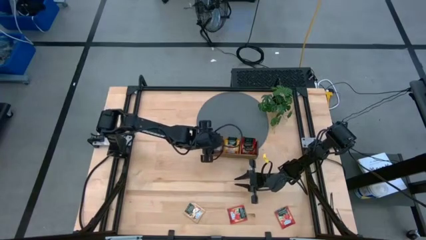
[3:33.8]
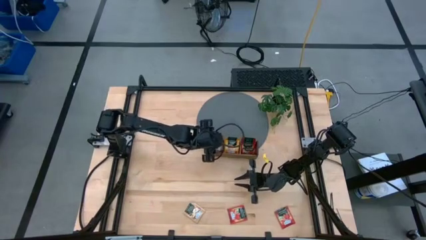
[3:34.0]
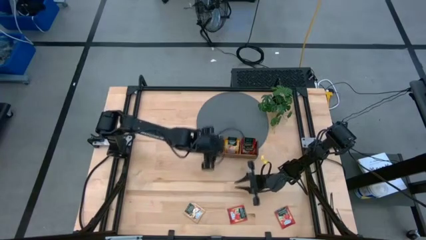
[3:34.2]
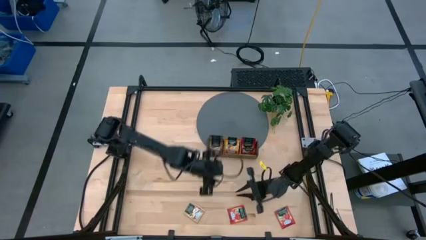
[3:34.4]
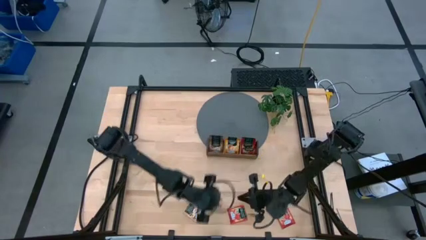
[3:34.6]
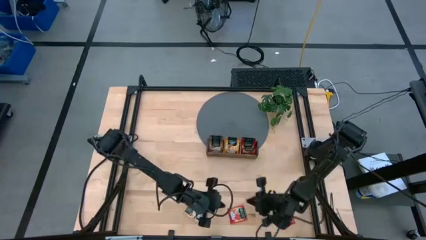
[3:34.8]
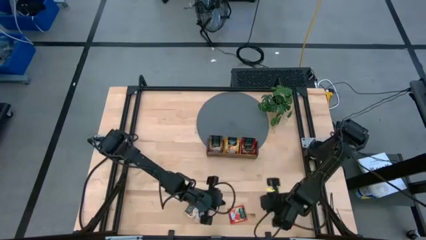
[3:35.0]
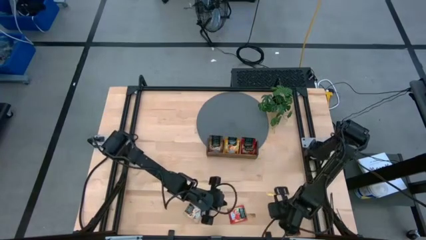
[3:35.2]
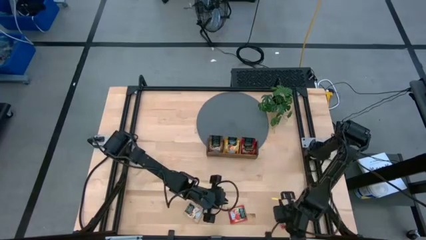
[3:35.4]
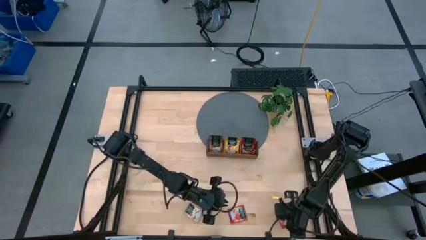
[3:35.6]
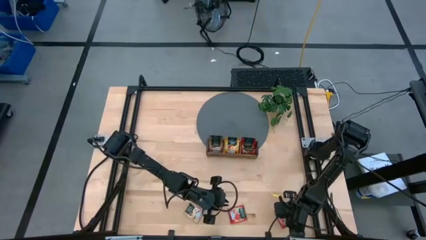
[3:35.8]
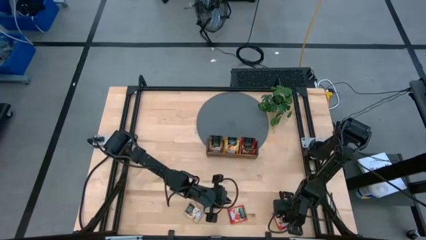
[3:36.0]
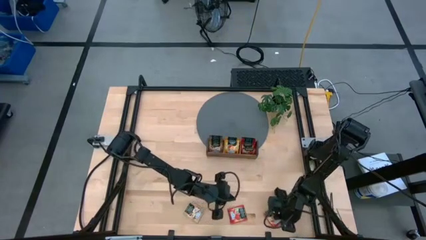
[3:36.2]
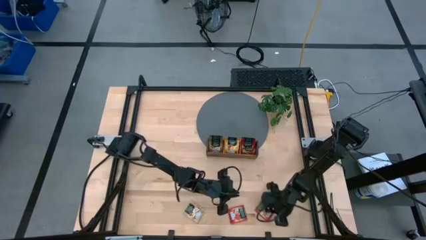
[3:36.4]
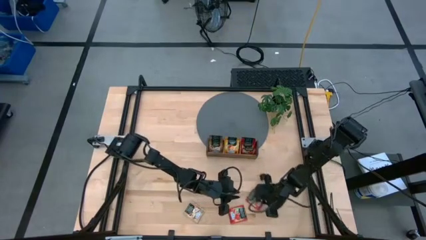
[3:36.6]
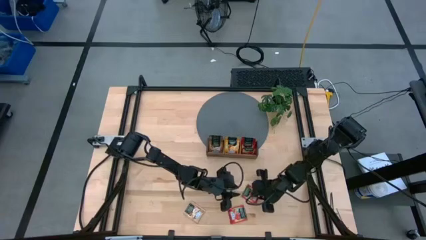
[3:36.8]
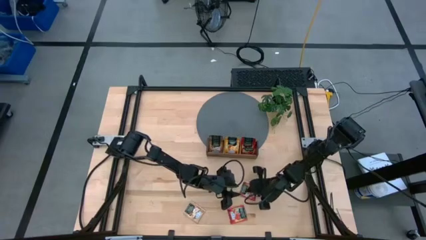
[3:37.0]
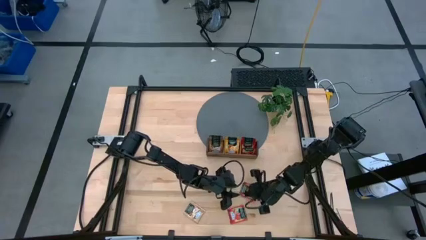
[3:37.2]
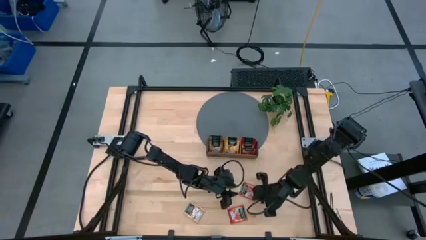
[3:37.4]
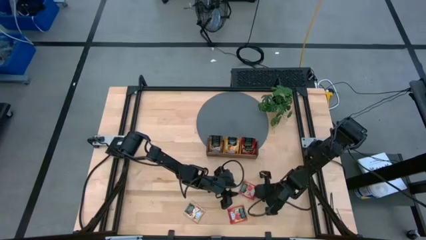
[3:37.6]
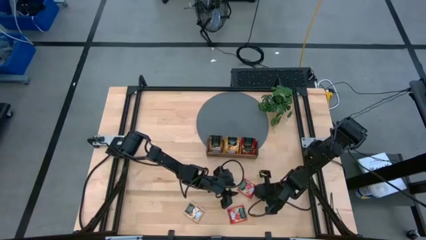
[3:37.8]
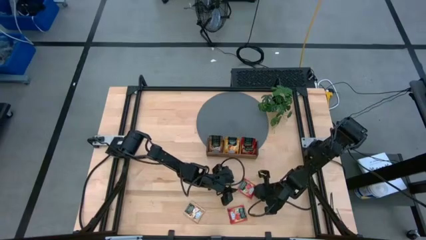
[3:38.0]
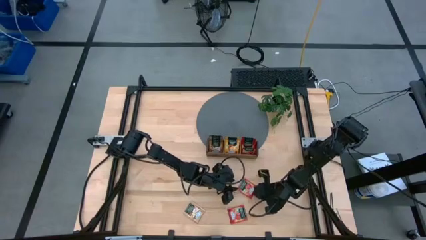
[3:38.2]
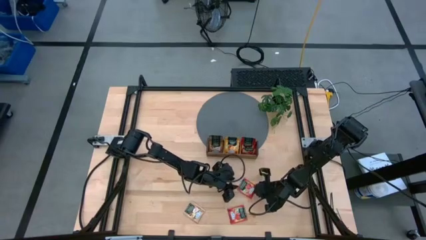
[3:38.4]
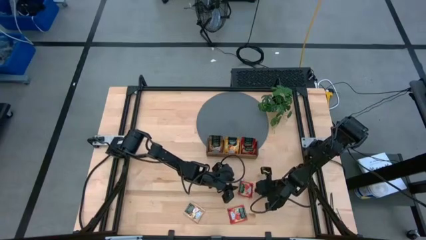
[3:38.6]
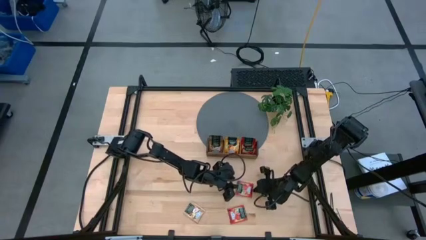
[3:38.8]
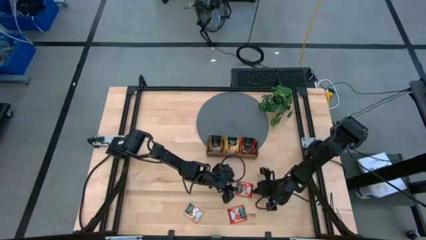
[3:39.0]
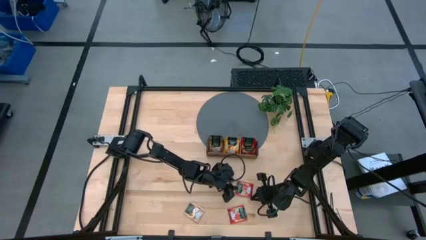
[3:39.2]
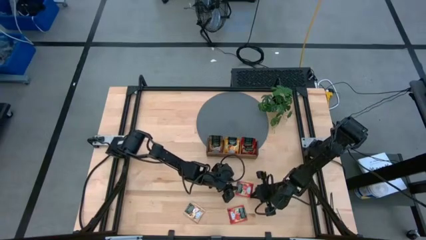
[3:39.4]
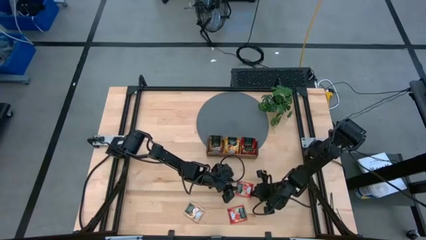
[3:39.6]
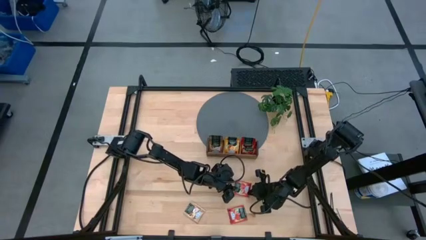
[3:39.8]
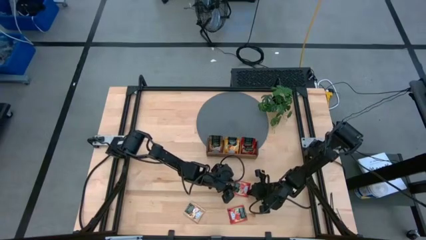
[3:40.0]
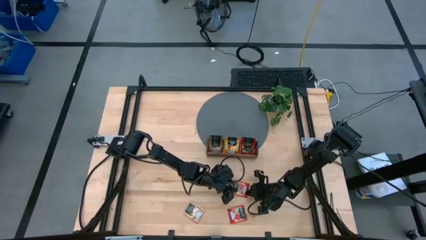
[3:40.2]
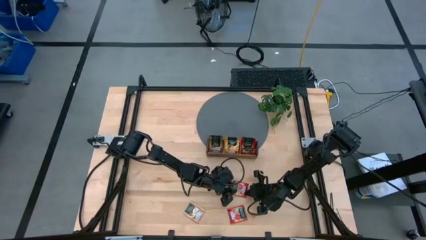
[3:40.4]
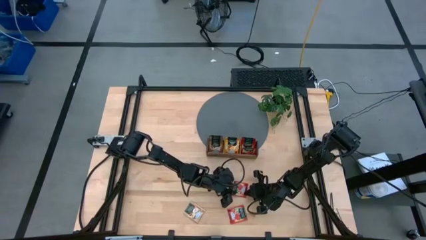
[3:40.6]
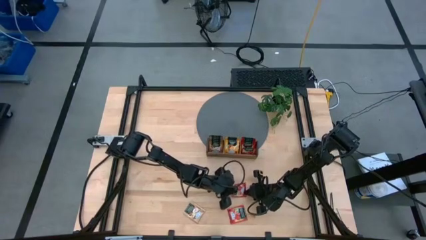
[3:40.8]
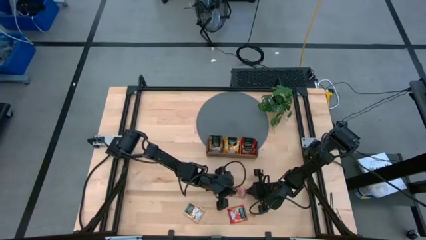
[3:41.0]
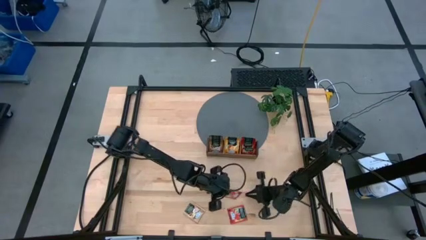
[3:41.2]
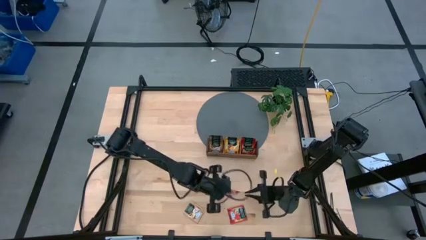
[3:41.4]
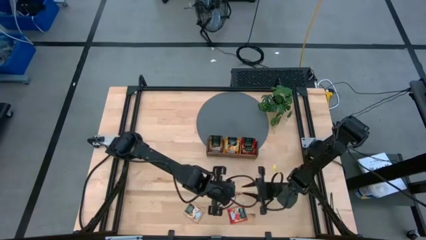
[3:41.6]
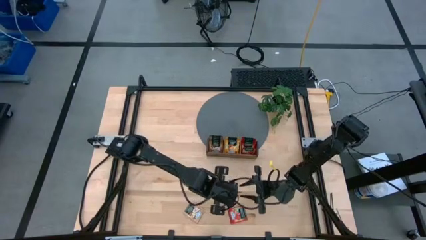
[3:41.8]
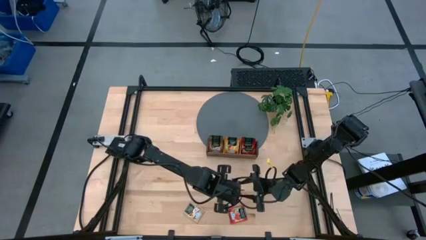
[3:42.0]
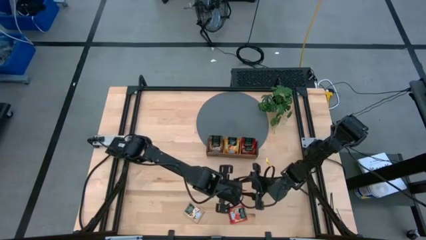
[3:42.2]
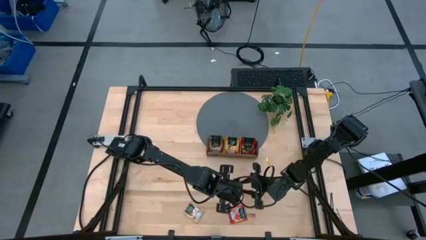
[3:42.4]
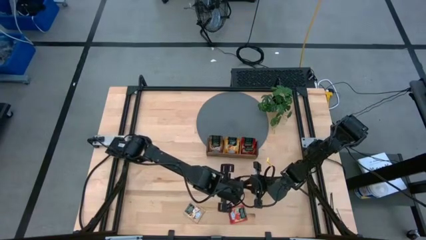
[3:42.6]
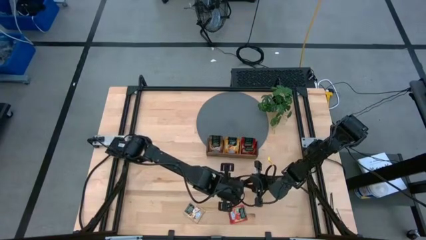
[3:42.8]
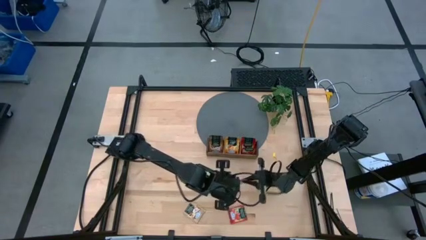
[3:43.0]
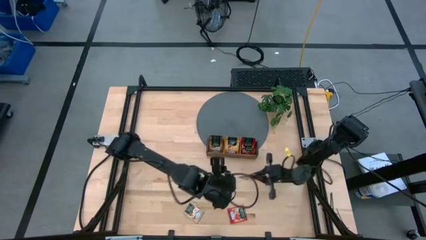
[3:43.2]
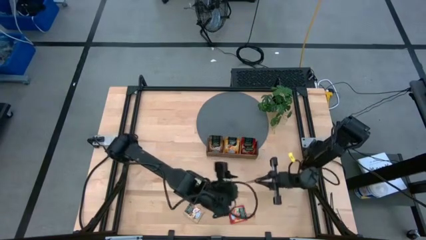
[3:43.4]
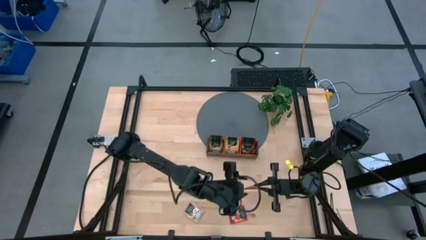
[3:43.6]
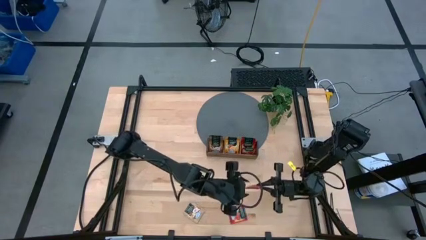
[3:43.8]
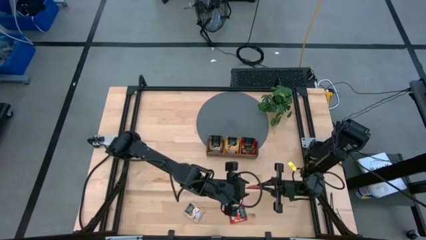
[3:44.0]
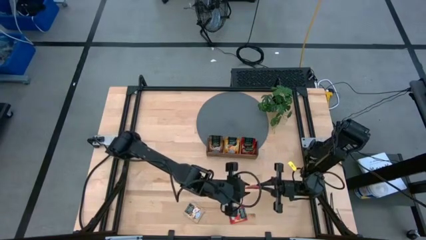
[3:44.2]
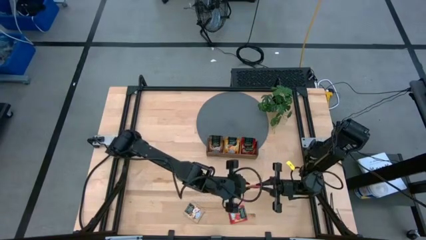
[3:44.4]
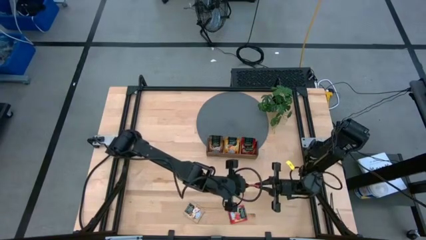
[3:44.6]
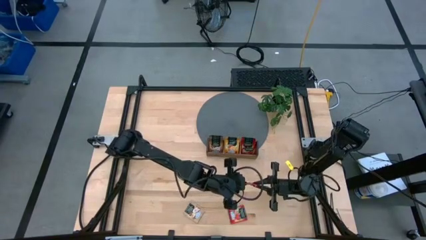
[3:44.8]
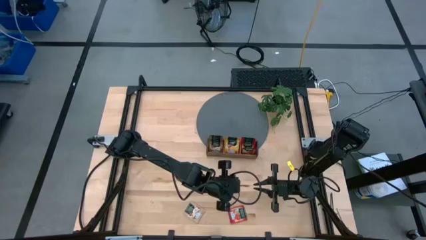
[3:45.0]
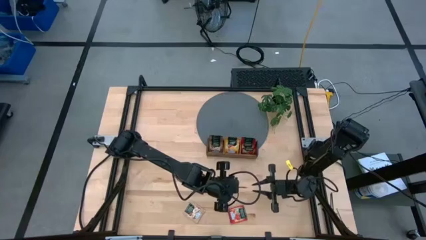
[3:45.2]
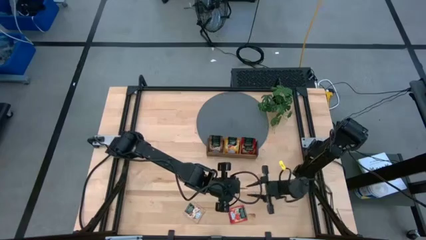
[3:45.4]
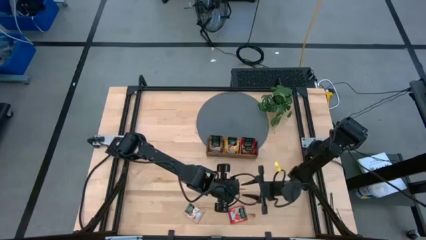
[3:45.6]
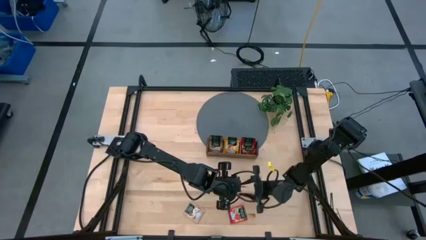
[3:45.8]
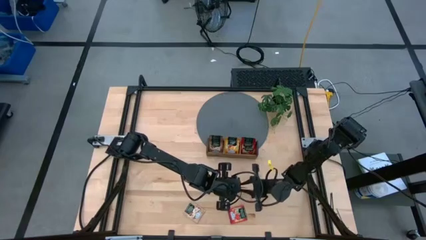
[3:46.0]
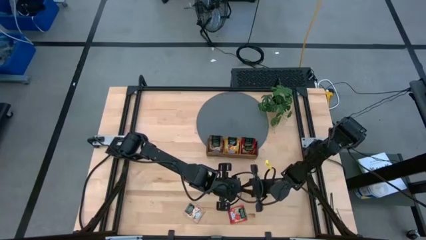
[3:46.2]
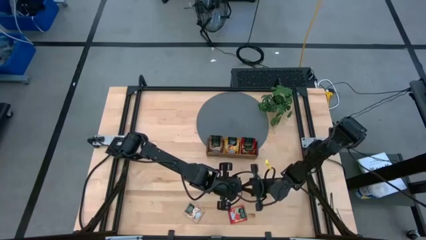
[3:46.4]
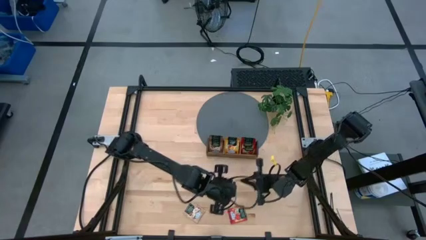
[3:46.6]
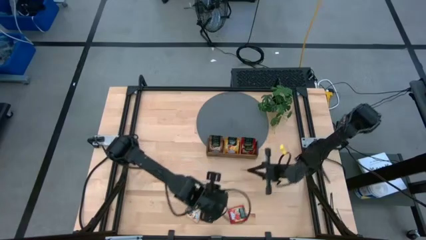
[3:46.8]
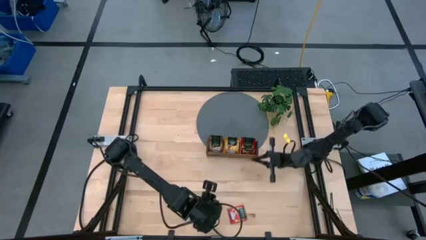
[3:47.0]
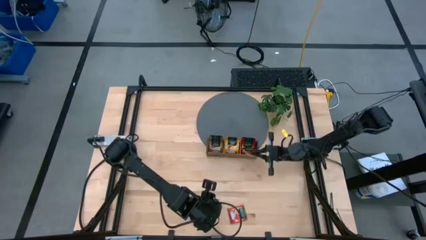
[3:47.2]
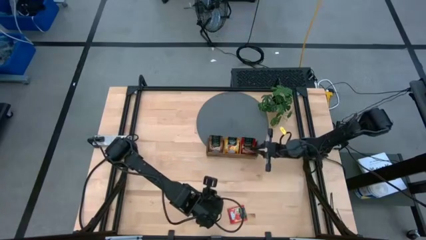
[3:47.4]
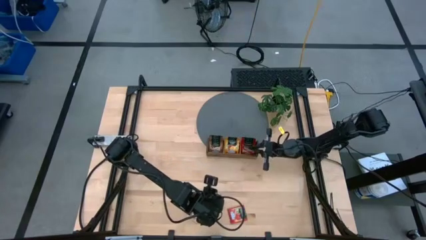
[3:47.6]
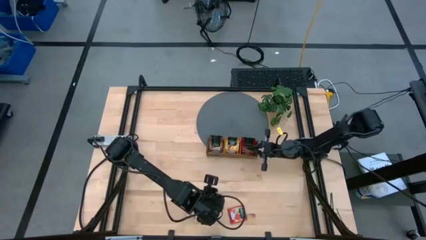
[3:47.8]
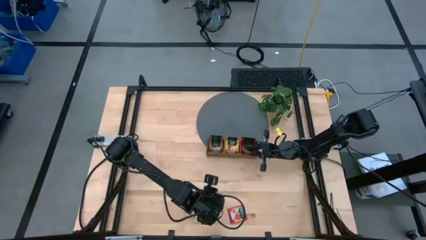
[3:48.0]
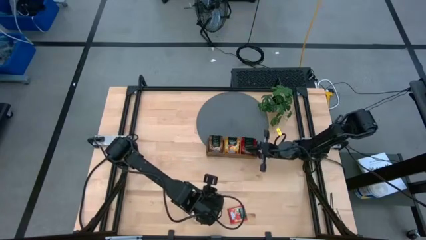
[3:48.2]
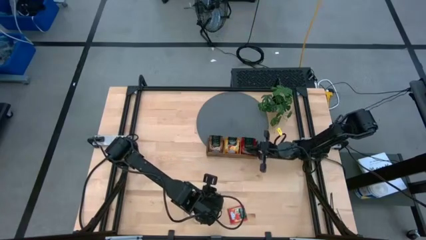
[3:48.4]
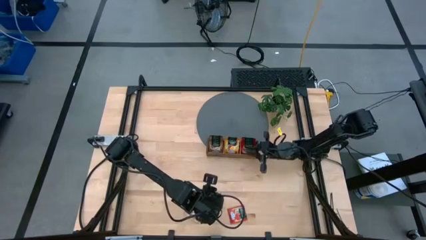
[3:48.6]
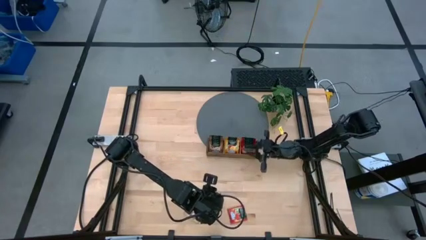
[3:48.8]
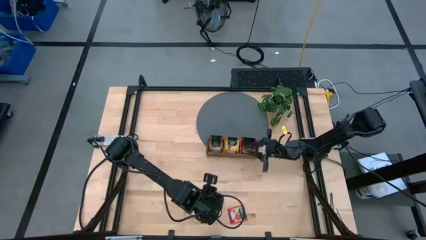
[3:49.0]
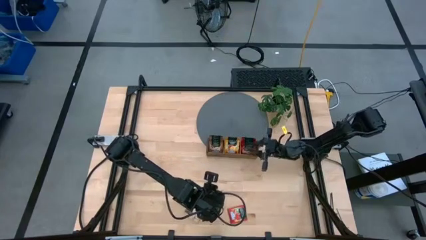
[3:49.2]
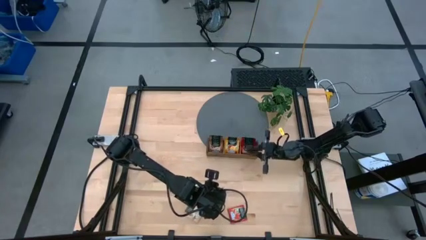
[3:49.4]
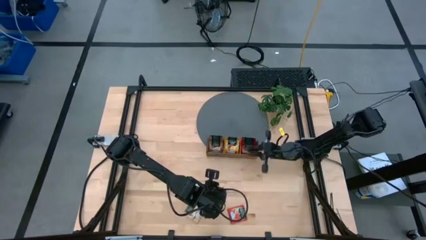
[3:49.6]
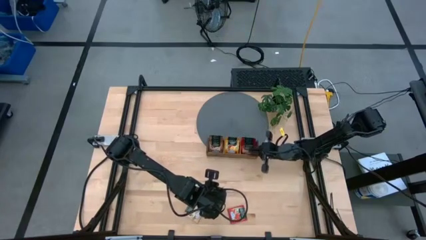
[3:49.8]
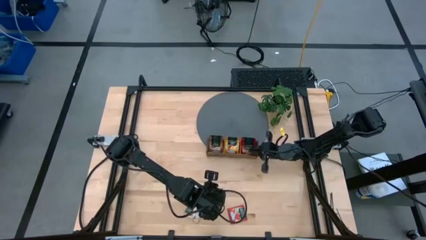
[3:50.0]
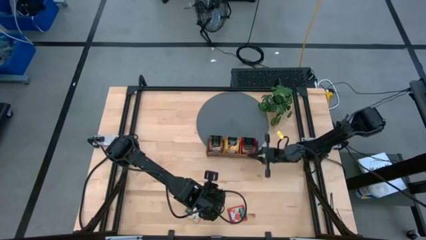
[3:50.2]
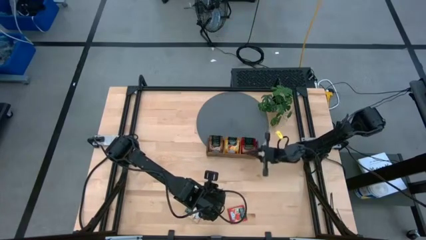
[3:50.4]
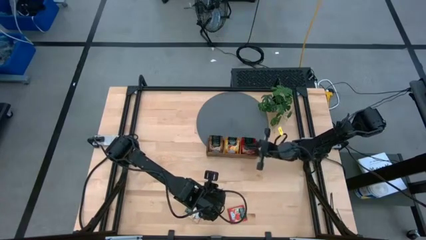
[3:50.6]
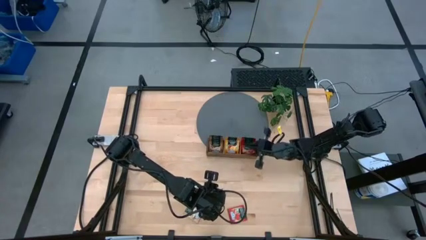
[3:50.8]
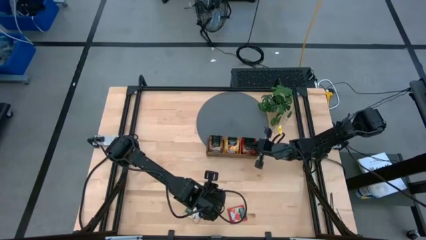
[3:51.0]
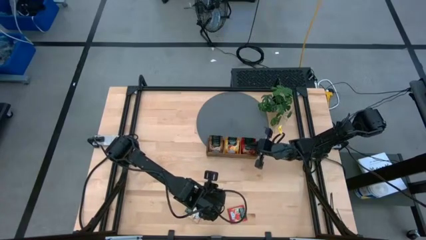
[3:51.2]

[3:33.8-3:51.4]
Task: Pick & Place Tea
Put the right red tea bag into the right wooden organizer
